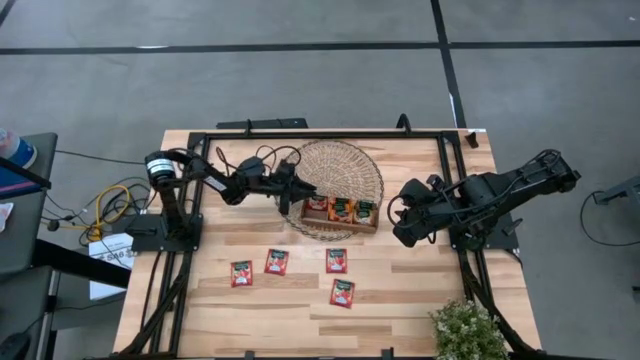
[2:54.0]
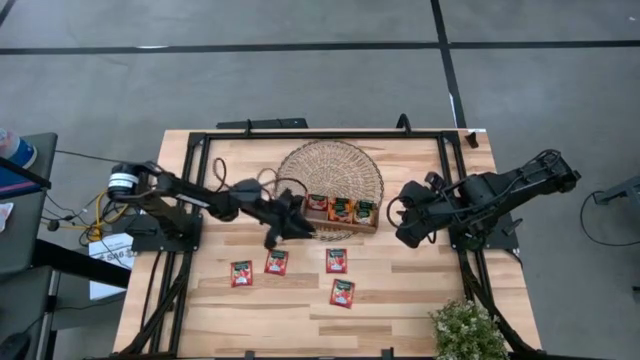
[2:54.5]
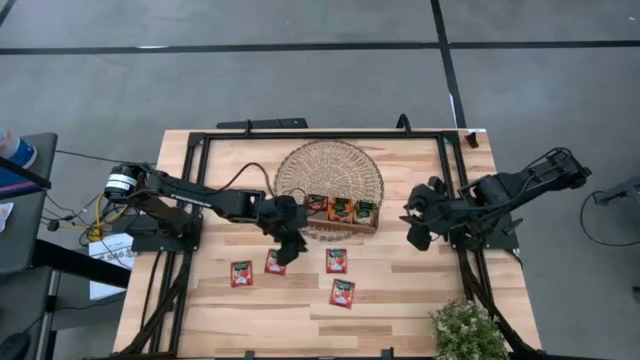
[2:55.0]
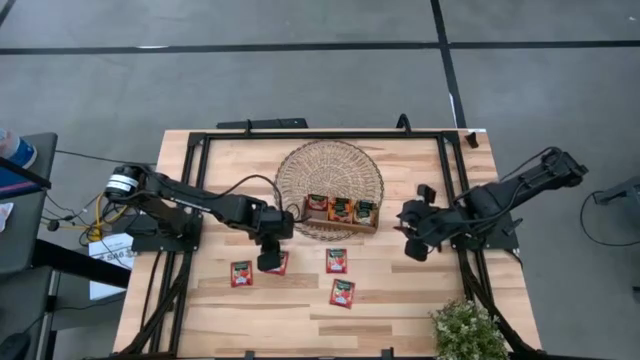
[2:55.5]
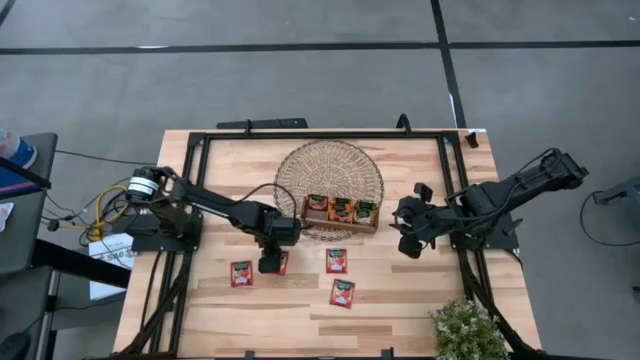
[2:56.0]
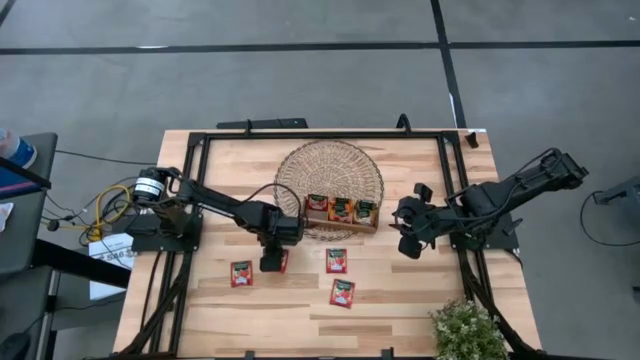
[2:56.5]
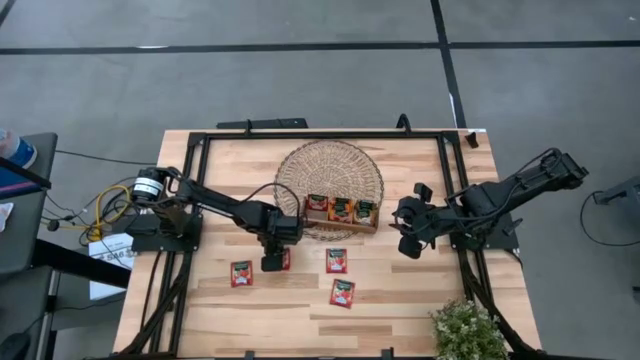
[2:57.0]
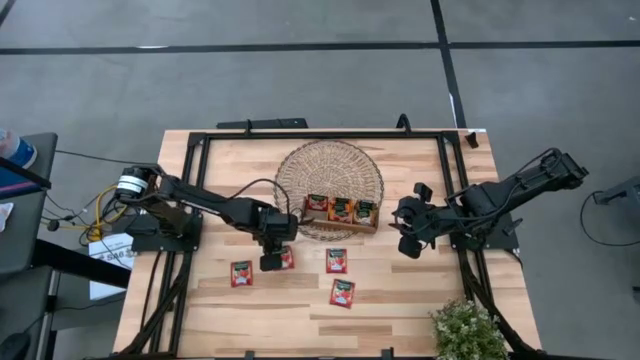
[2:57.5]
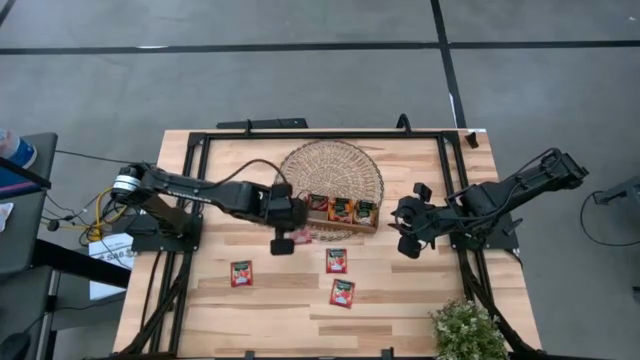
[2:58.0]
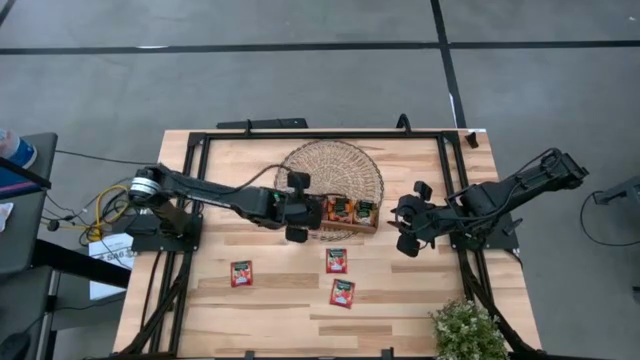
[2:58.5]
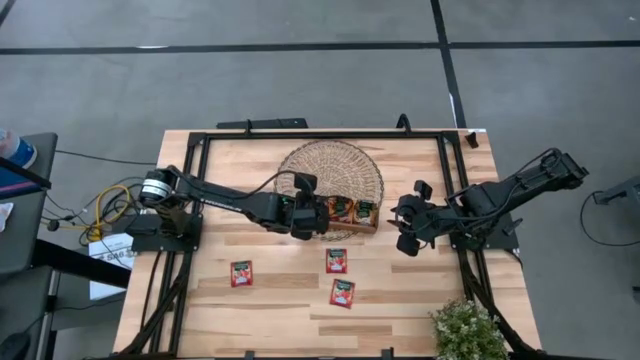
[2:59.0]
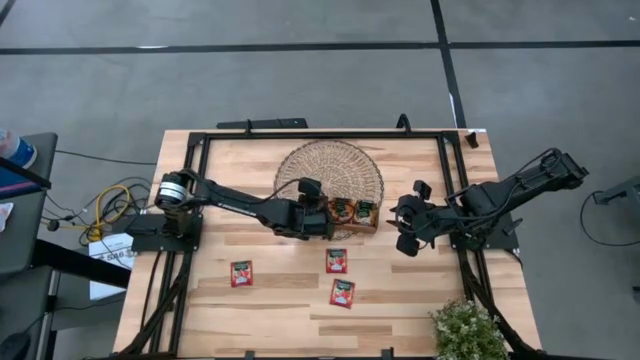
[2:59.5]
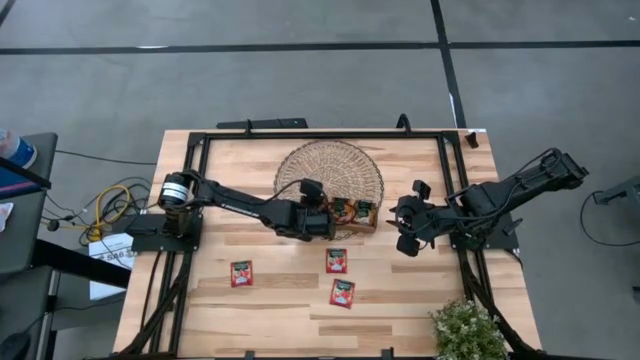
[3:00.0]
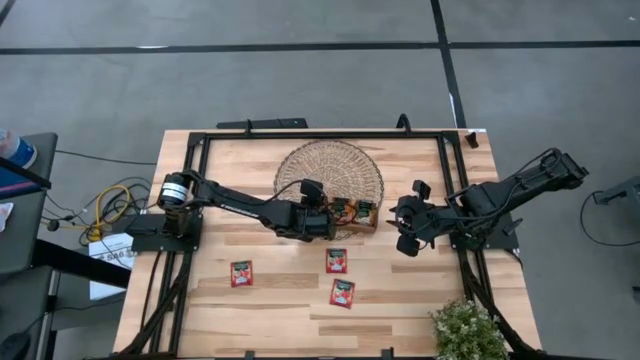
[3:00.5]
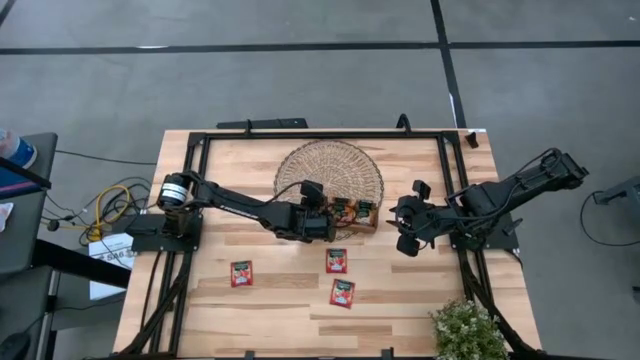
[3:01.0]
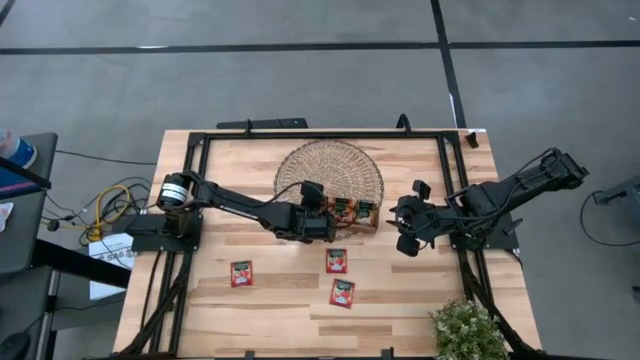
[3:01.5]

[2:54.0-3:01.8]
Task: Pick & Place Tea
Put the red tea bag into the left section of the wooden organizer

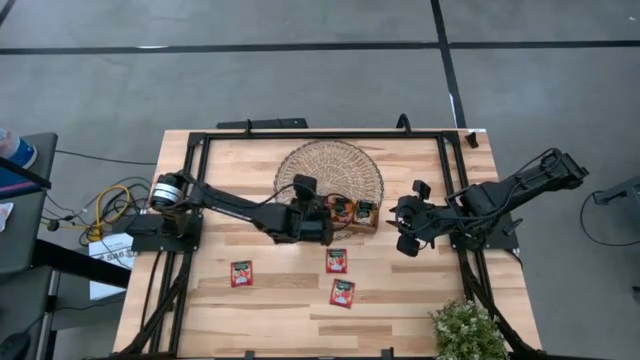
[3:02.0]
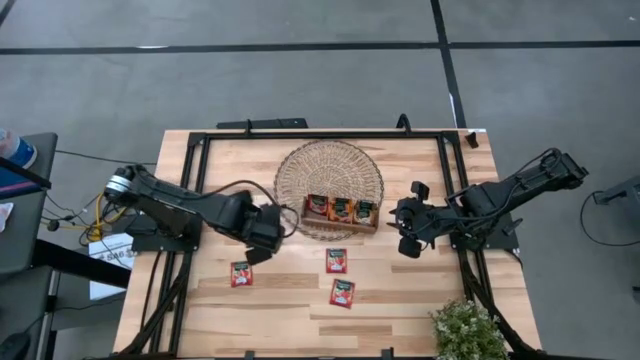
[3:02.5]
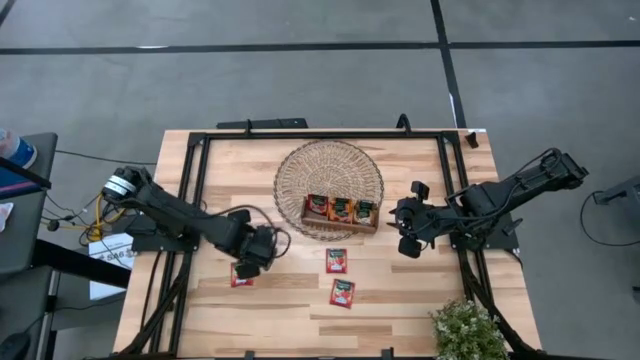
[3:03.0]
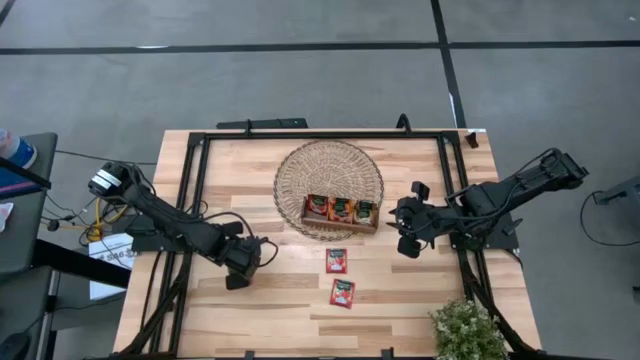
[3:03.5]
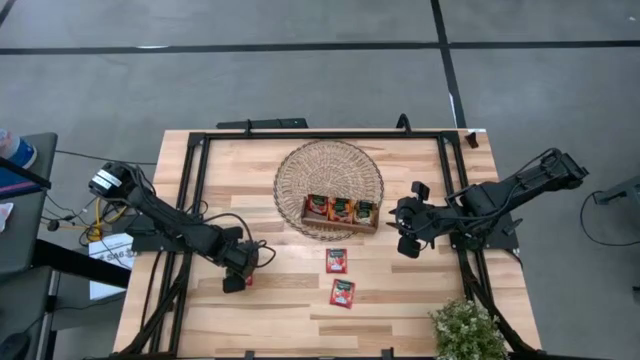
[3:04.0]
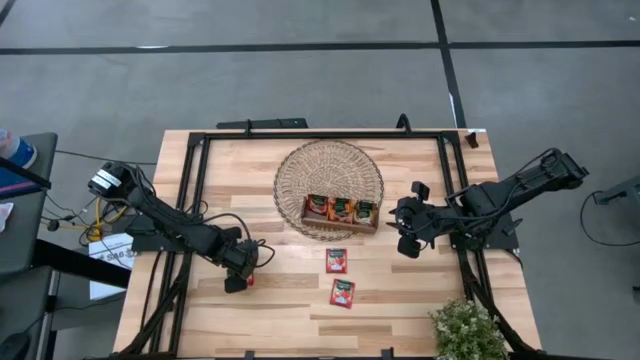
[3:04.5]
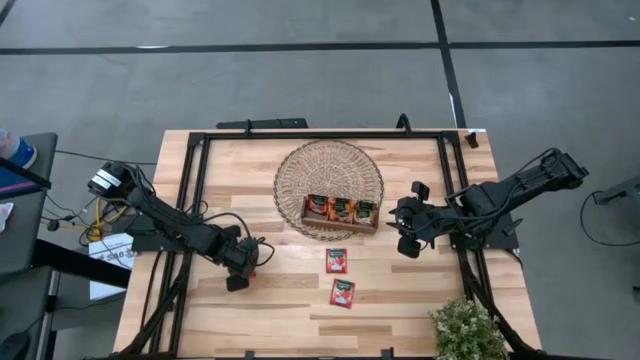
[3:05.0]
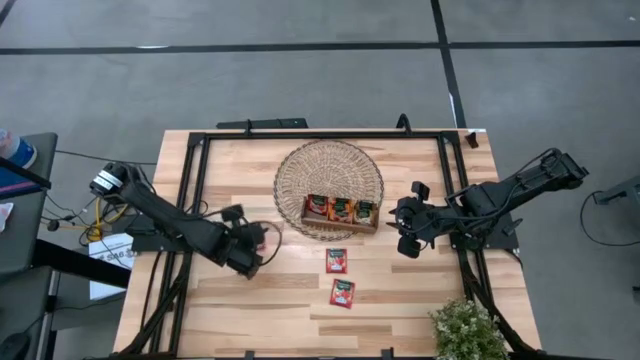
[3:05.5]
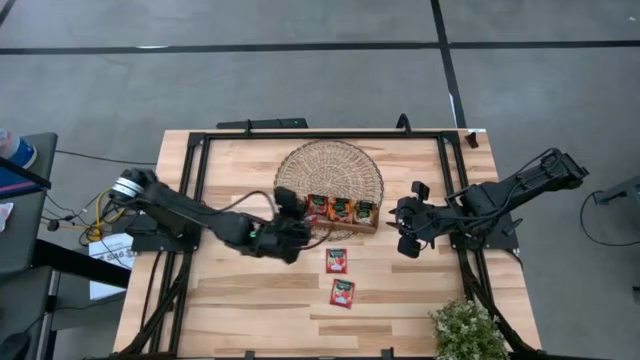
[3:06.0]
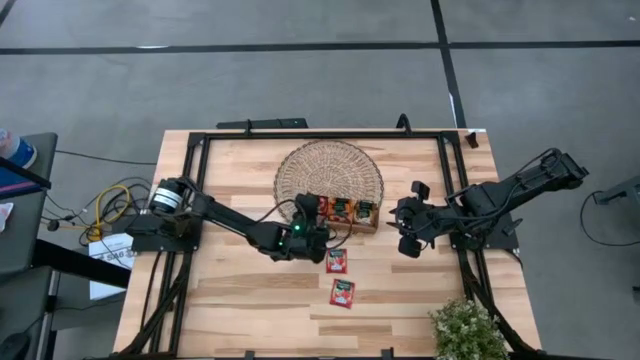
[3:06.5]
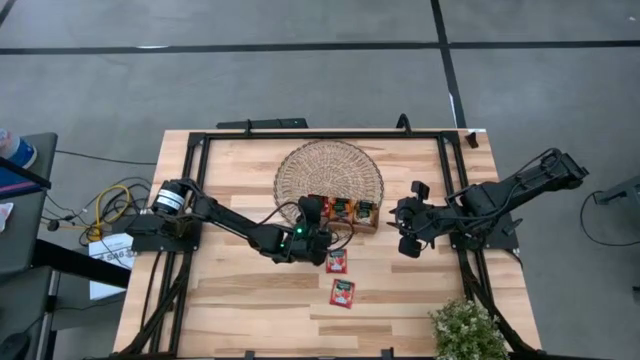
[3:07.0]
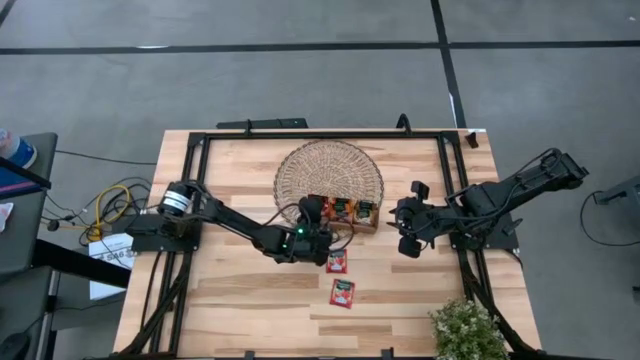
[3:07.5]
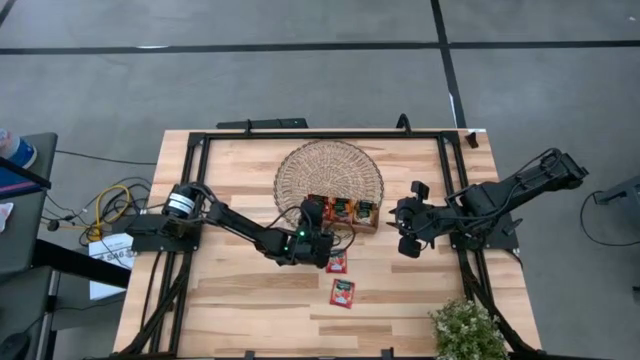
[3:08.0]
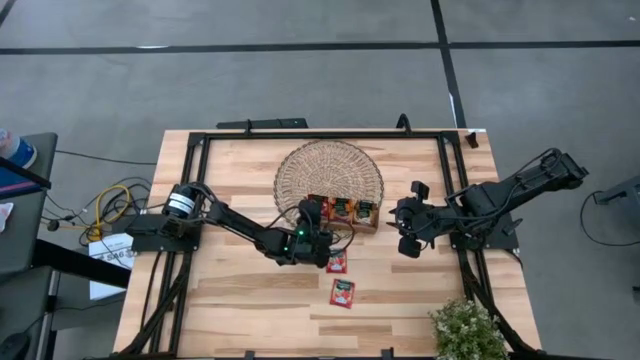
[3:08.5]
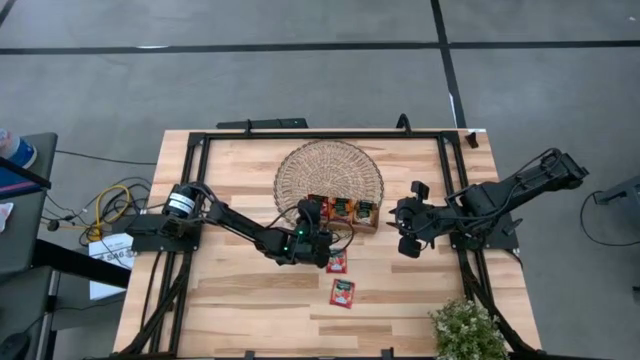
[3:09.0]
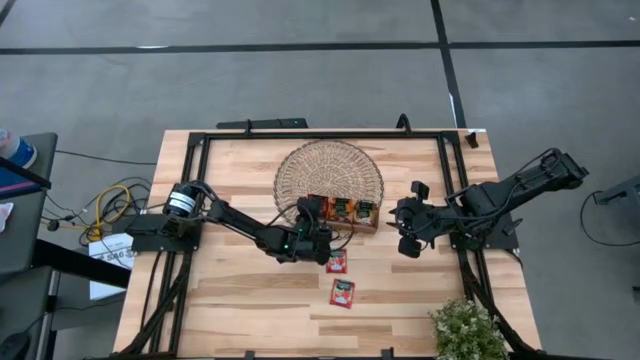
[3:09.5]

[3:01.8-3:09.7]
Put the red tea bag into the left section of the wooden organizer

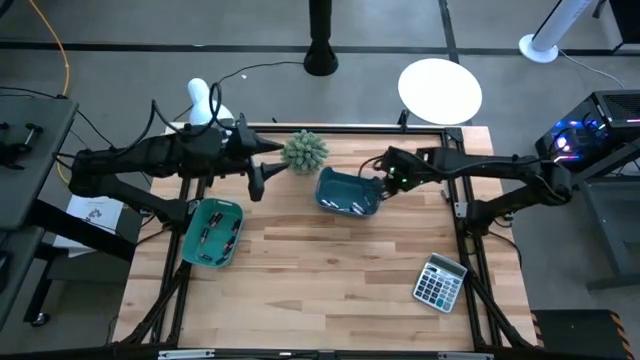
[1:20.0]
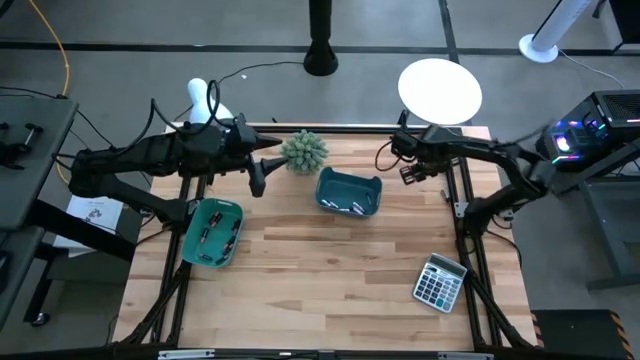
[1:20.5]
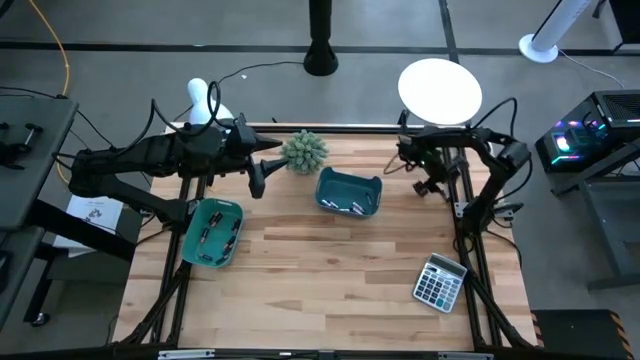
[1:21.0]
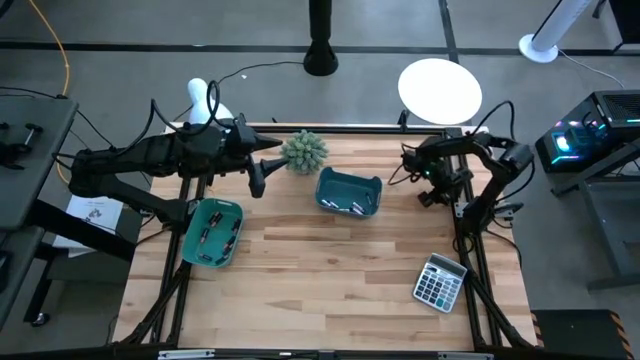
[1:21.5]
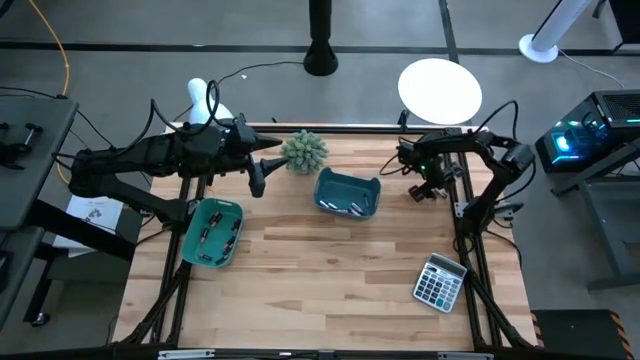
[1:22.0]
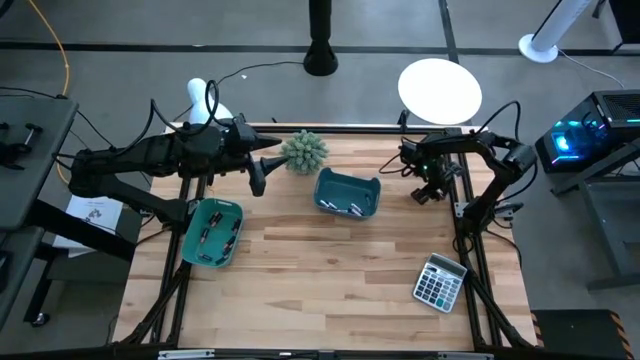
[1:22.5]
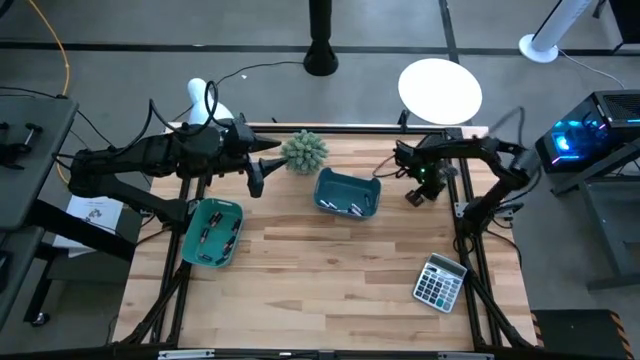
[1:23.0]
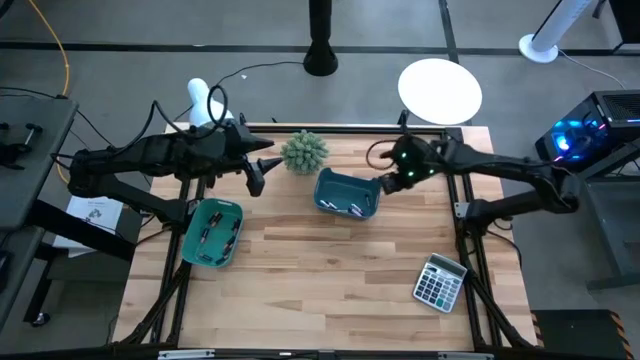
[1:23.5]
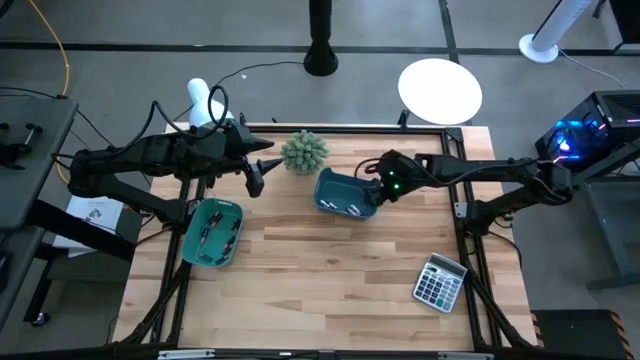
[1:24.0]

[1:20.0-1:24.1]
Task: Sort batteries
Put the silver battery into the blue bin
